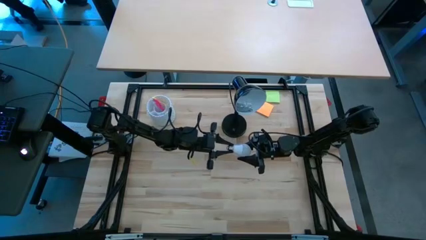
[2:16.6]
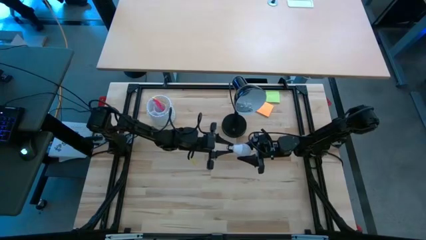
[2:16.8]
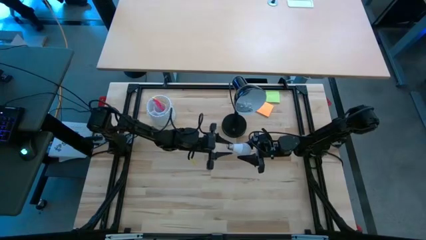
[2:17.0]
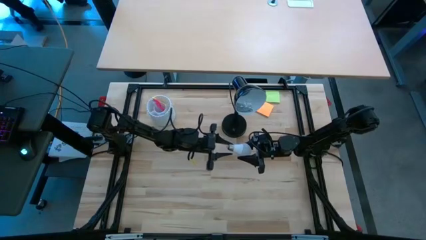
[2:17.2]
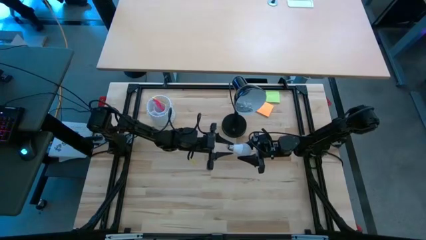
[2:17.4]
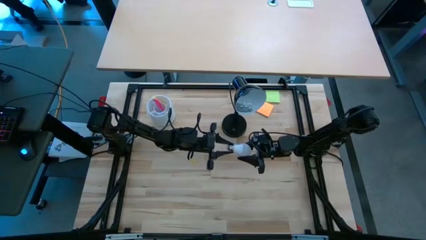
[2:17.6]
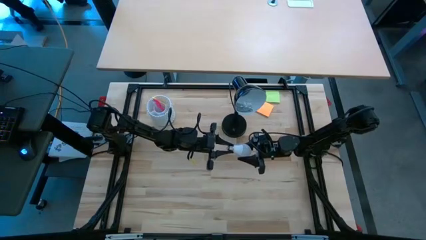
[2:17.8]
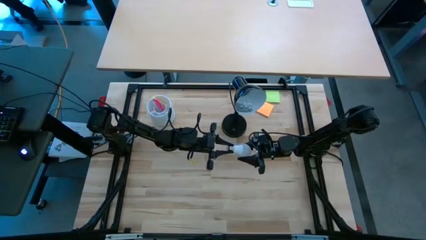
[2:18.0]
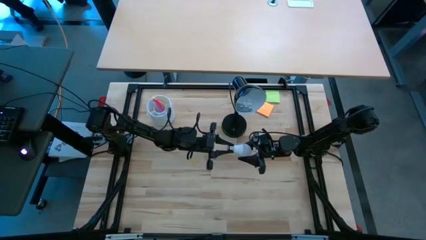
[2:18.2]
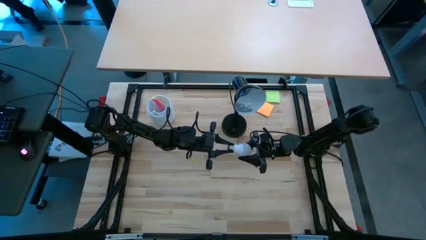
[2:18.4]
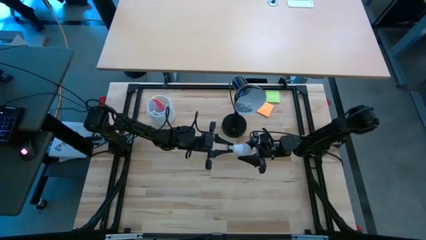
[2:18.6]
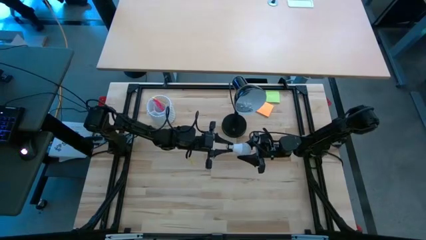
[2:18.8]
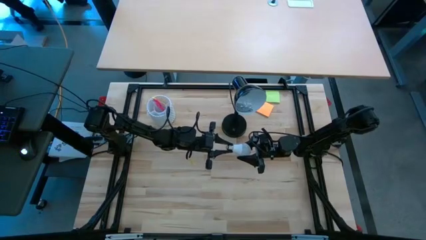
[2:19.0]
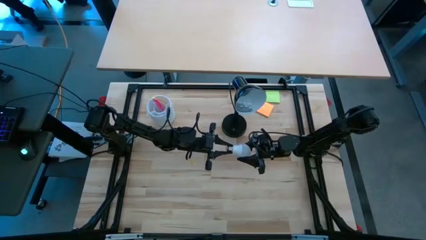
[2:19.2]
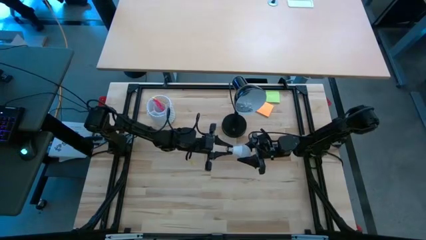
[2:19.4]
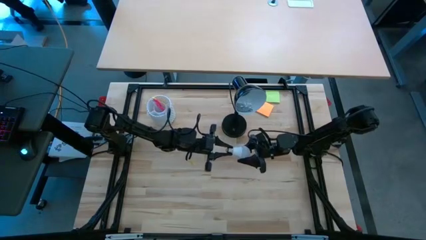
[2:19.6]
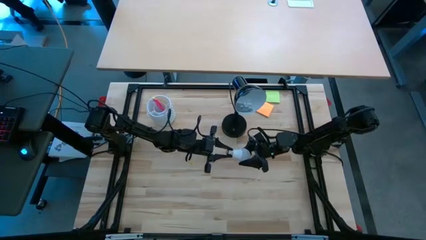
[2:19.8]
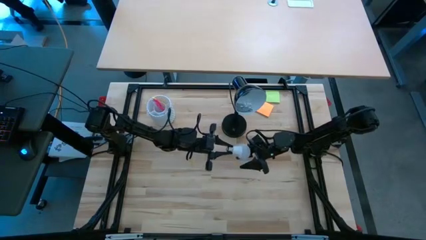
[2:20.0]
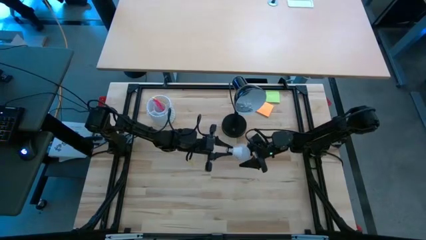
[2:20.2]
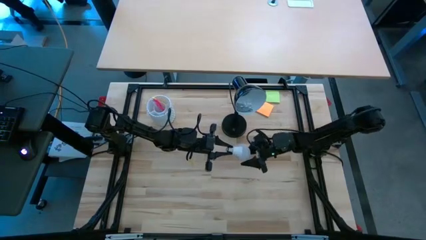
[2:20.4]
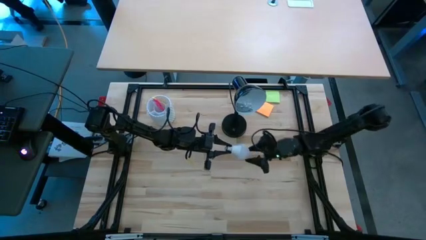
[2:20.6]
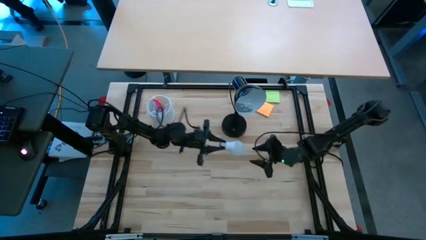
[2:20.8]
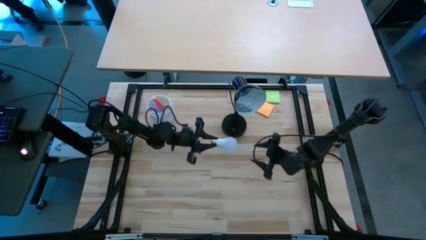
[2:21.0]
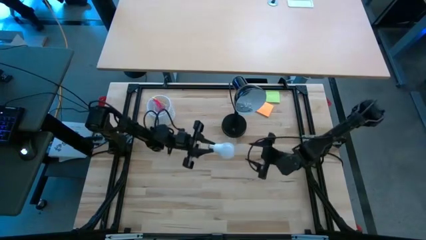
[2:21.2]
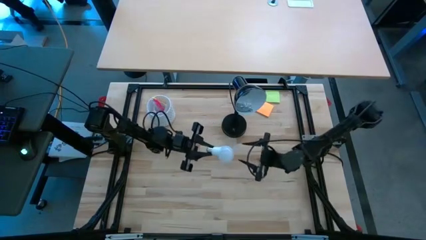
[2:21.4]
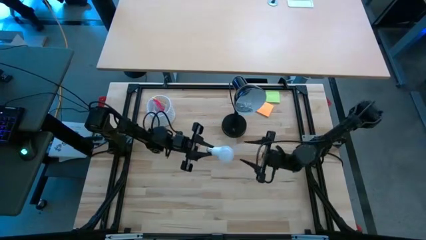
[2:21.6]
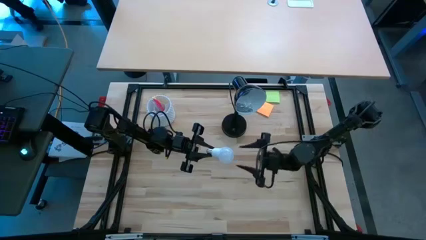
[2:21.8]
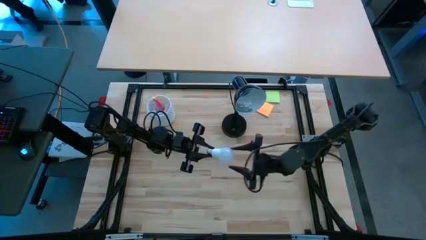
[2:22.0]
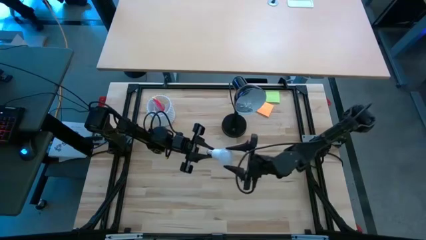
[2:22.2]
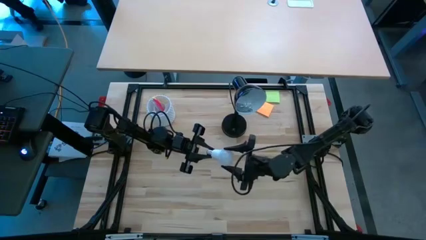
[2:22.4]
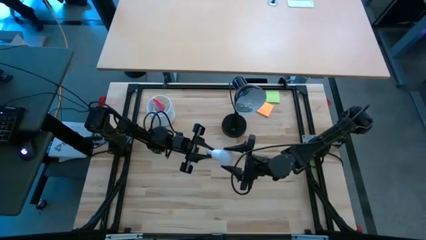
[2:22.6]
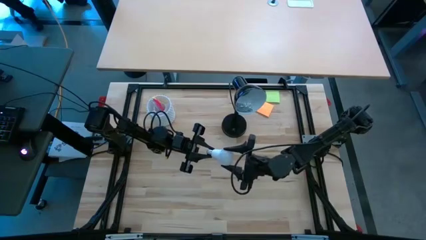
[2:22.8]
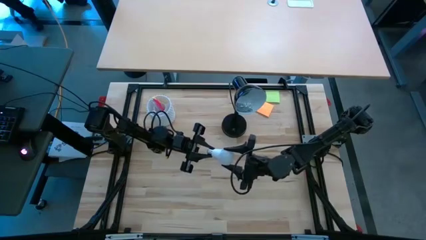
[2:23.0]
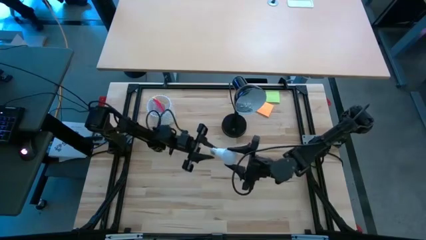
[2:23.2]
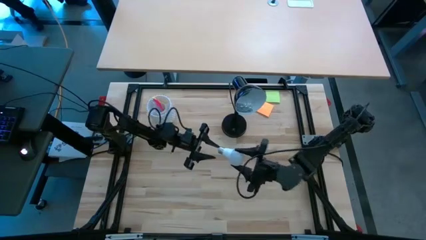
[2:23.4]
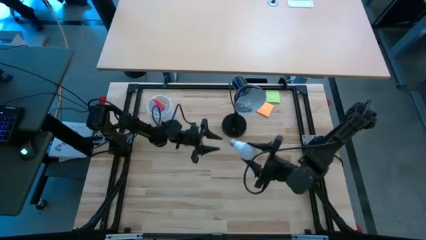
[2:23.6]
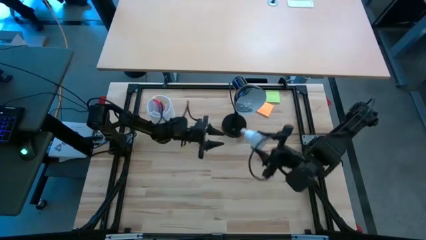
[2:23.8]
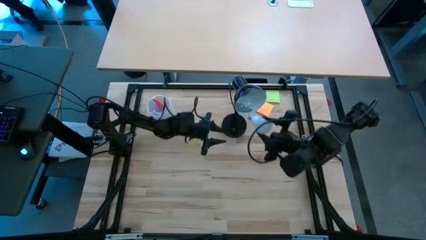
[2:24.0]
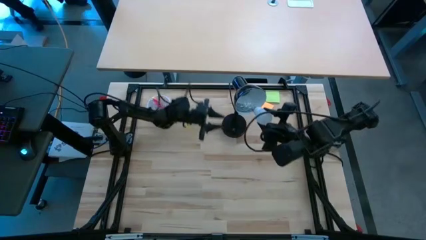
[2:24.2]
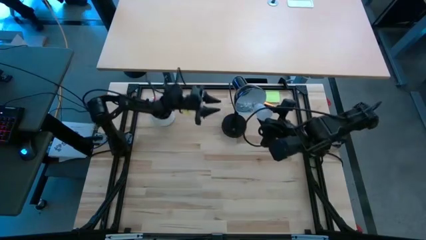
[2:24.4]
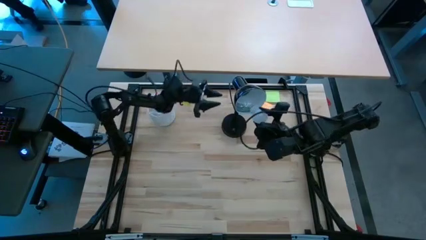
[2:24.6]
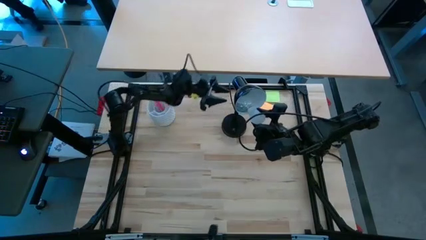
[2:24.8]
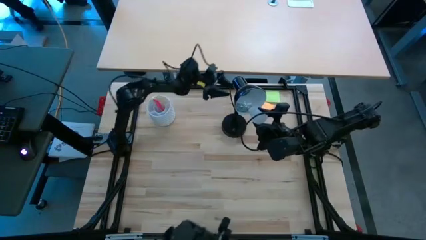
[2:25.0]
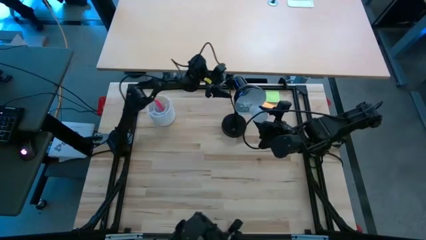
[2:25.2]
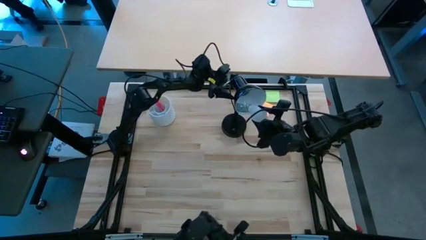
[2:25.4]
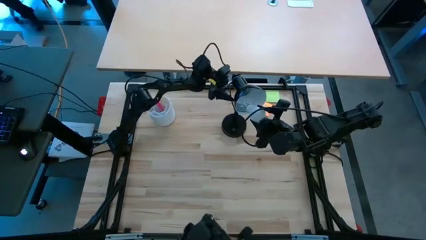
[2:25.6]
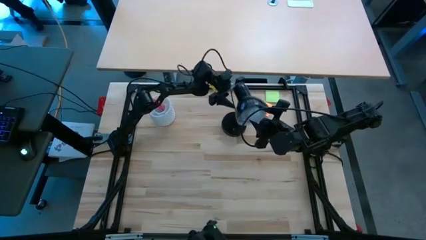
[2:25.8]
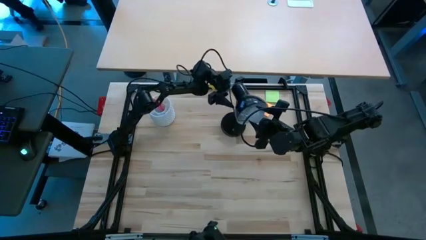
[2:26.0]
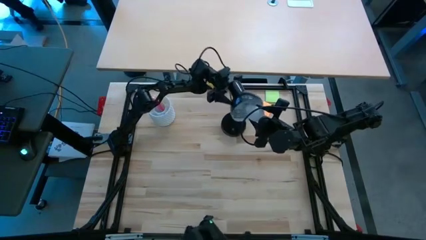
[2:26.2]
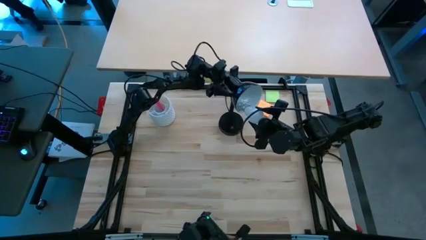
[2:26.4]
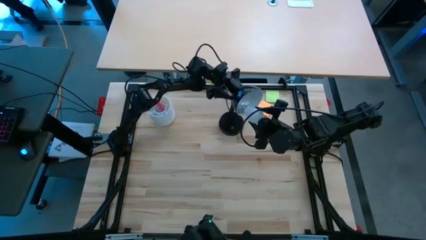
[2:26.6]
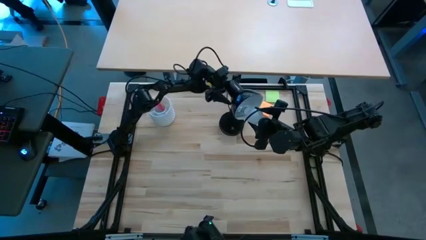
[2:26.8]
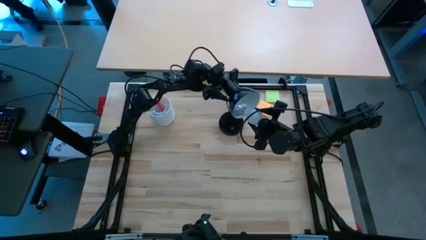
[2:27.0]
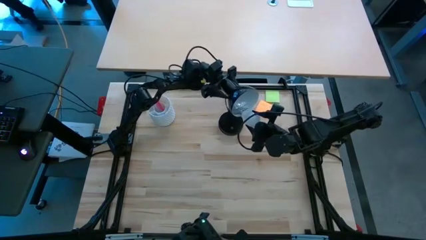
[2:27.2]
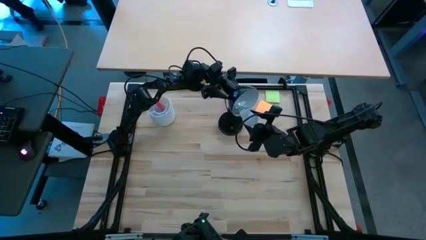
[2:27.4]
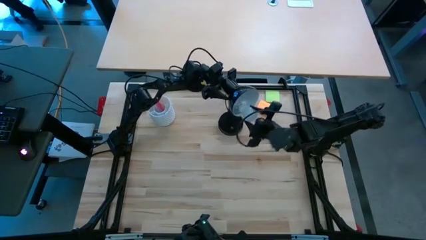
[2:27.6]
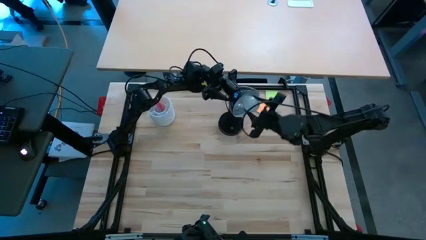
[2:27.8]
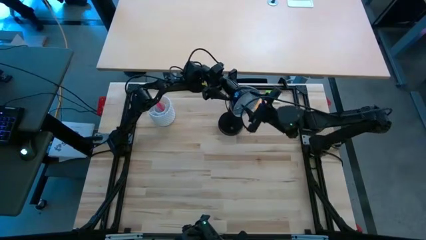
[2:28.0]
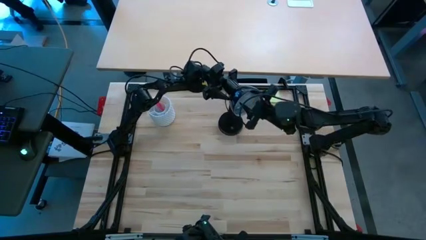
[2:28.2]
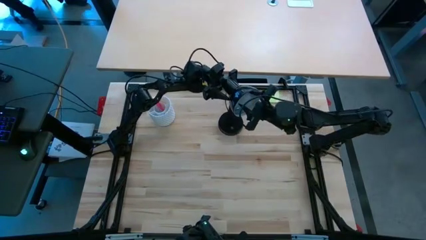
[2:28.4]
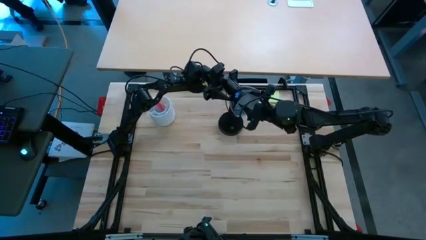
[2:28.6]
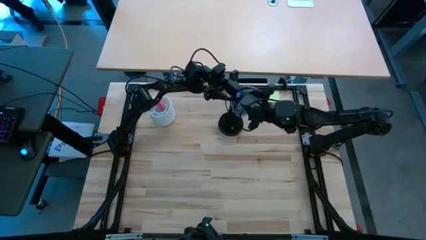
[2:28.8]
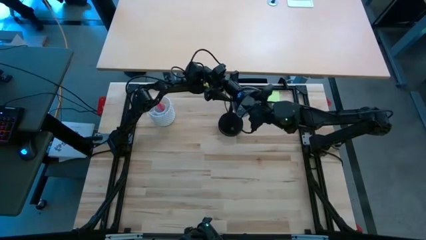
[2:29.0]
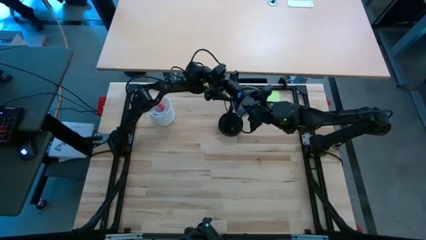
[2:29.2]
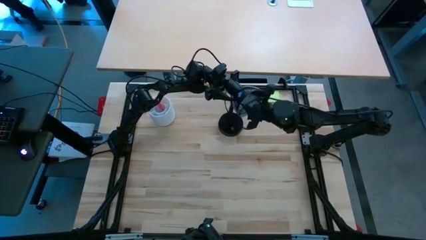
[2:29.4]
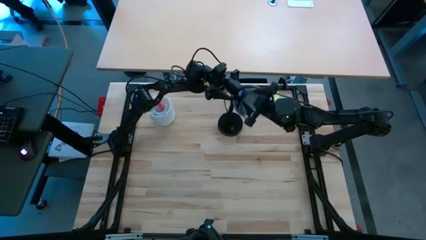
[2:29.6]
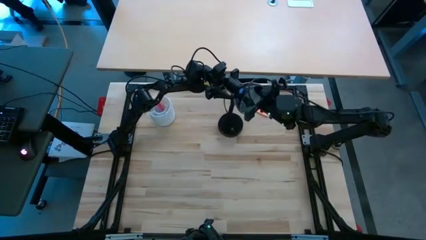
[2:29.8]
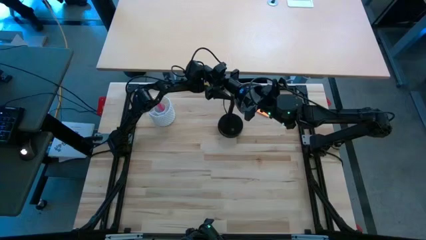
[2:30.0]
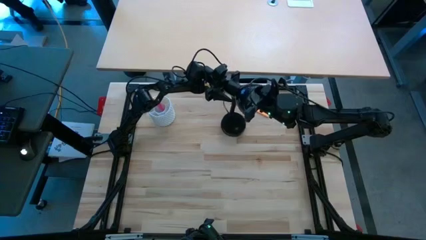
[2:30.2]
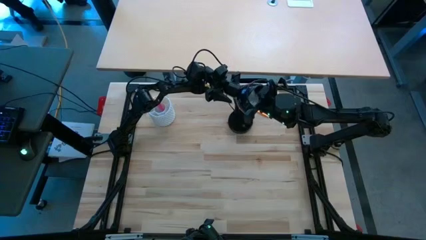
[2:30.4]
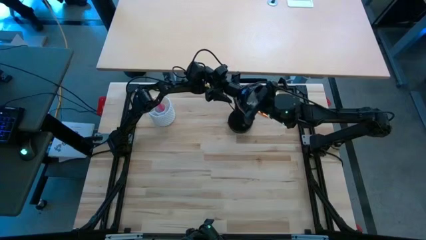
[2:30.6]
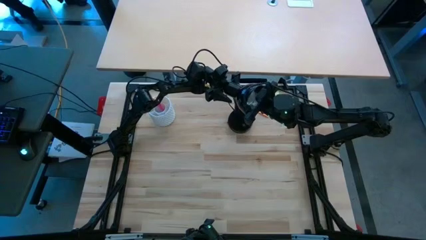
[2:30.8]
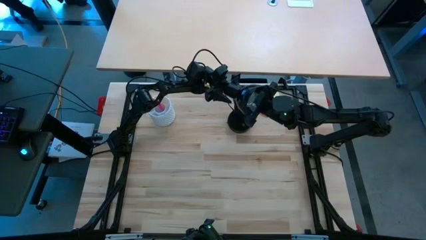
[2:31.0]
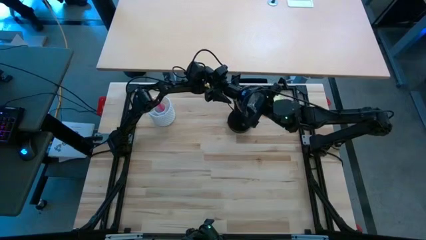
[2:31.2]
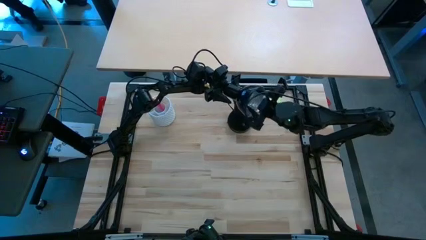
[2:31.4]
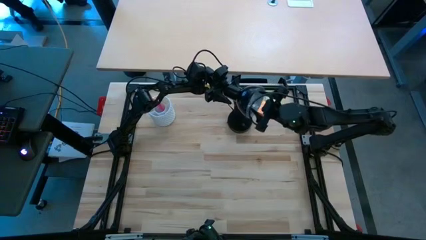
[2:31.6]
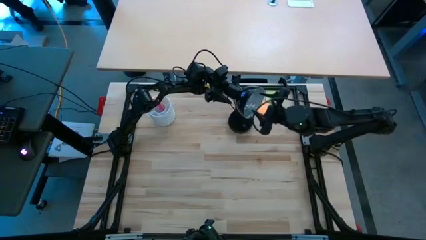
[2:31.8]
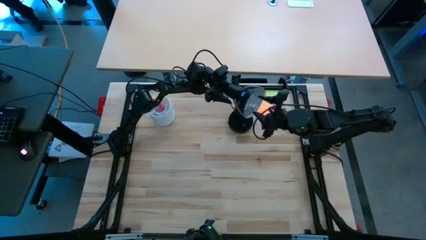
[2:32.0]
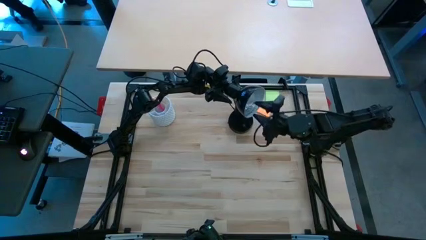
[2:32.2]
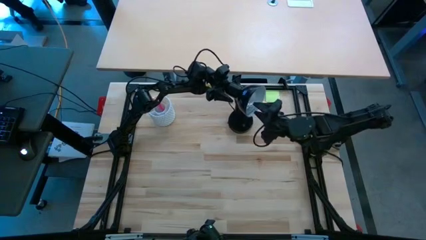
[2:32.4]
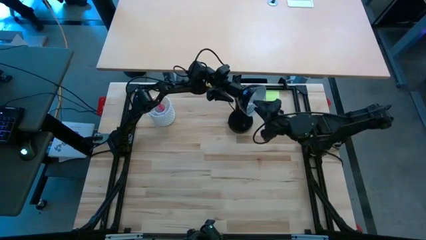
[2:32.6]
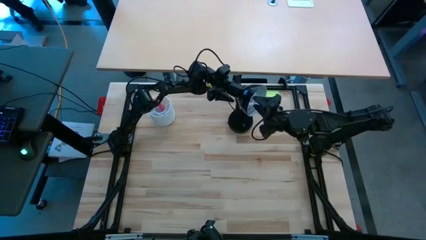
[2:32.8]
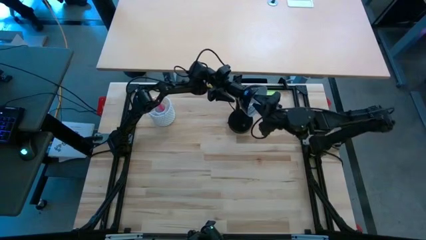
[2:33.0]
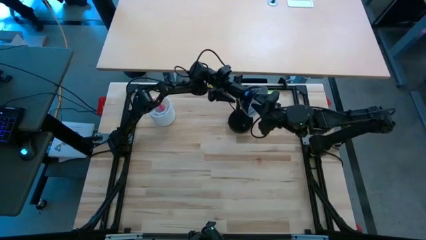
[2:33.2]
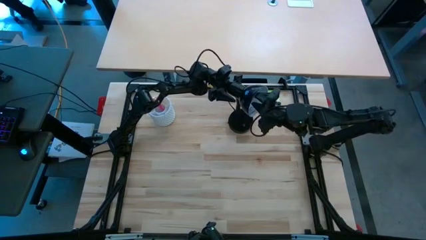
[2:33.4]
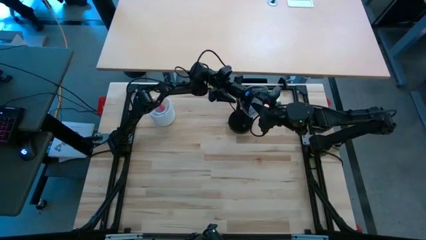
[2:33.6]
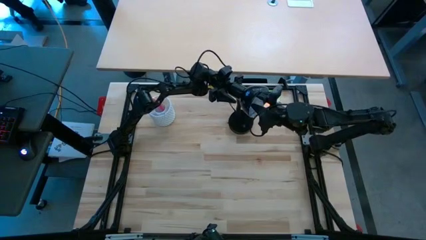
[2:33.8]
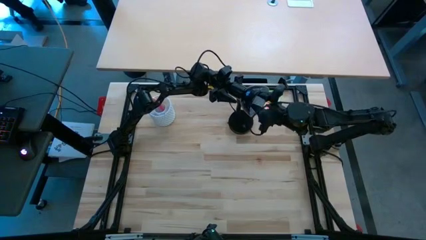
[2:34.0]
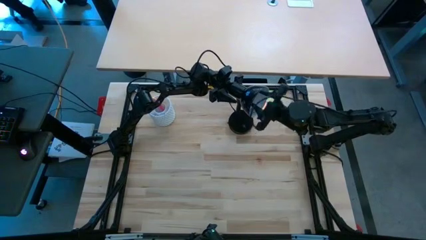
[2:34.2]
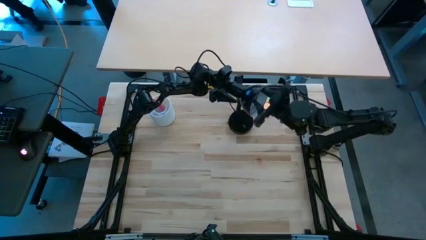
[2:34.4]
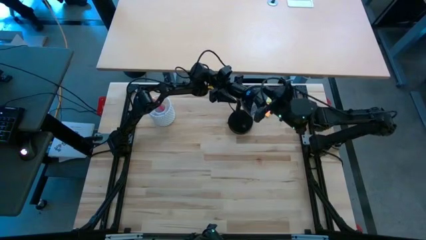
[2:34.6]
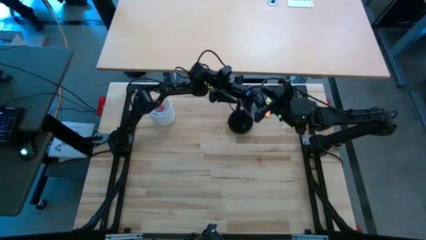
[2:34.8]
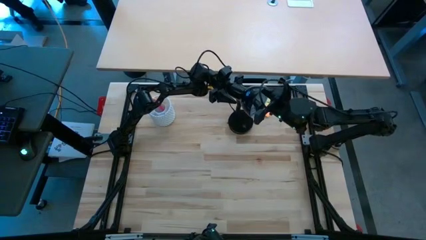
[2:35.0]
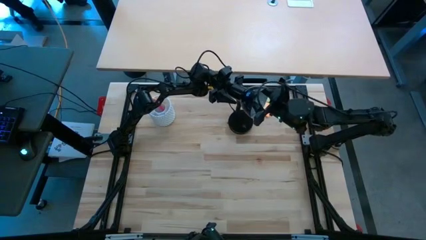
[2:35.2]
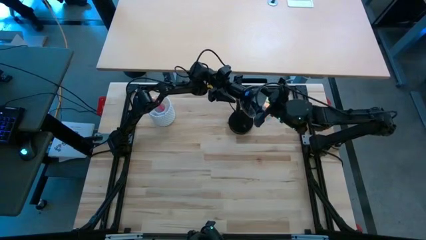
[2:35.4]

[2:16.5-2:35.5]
Task: Screw lightbulb
Insert the light bulb into the desk lamp
